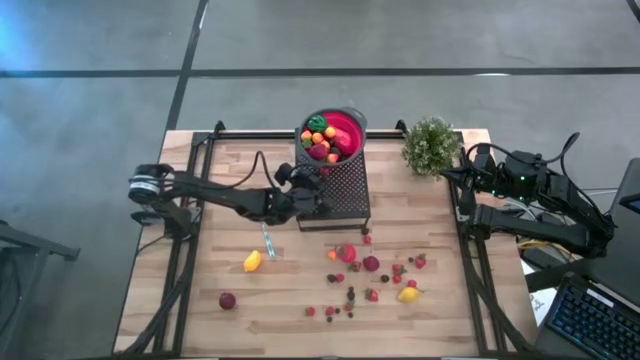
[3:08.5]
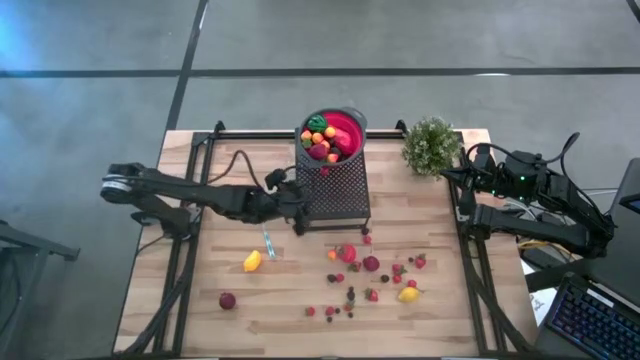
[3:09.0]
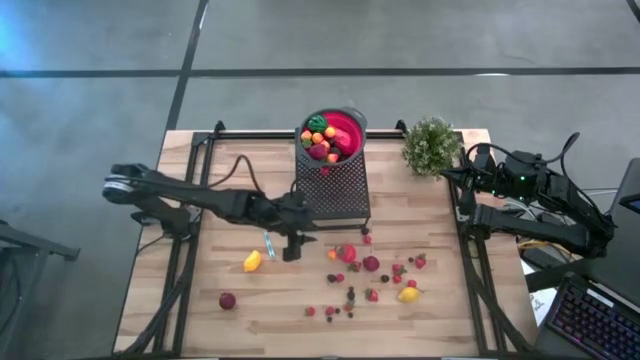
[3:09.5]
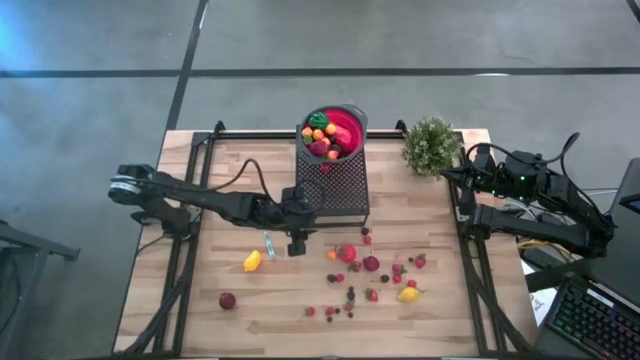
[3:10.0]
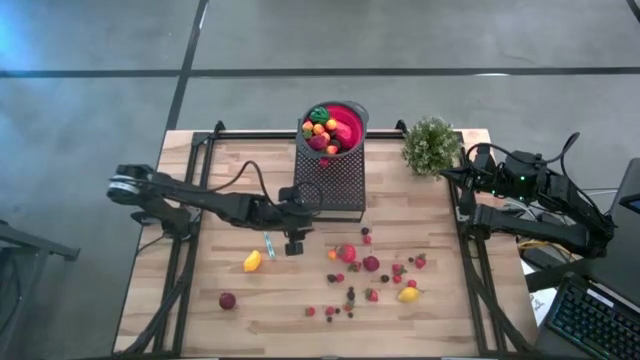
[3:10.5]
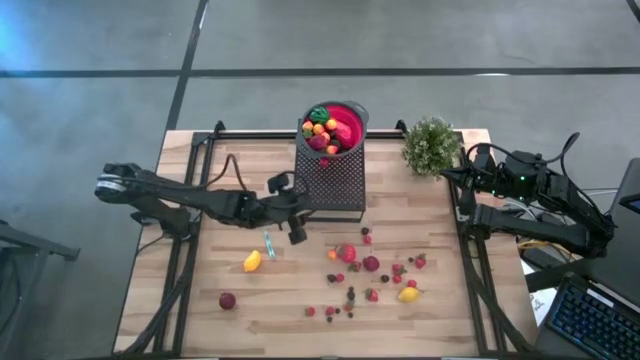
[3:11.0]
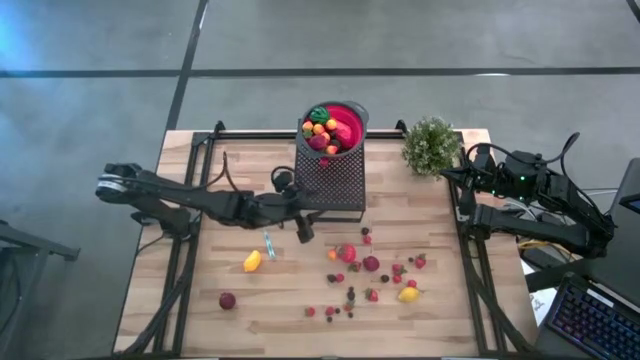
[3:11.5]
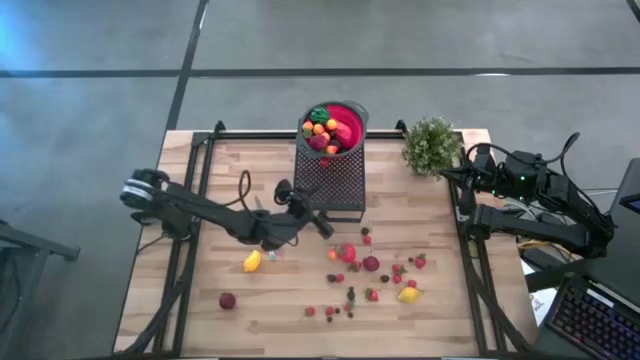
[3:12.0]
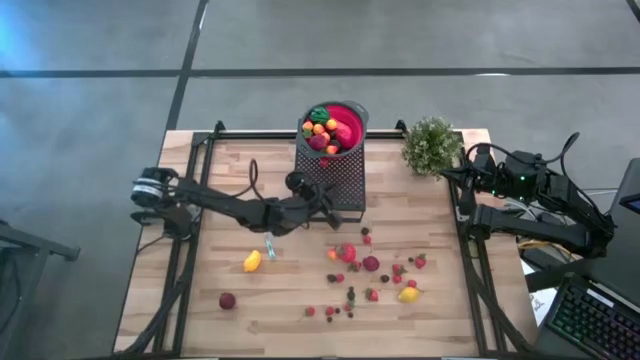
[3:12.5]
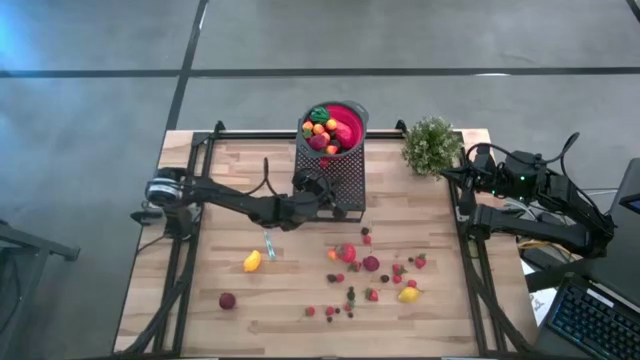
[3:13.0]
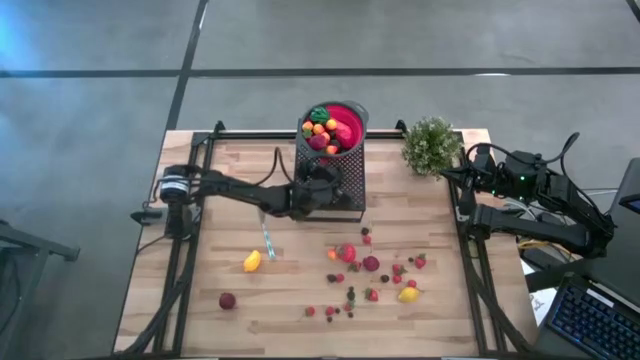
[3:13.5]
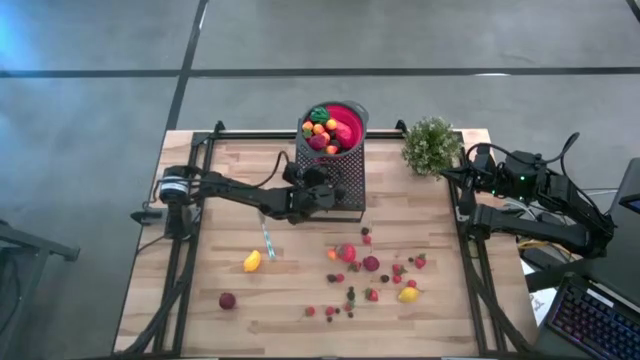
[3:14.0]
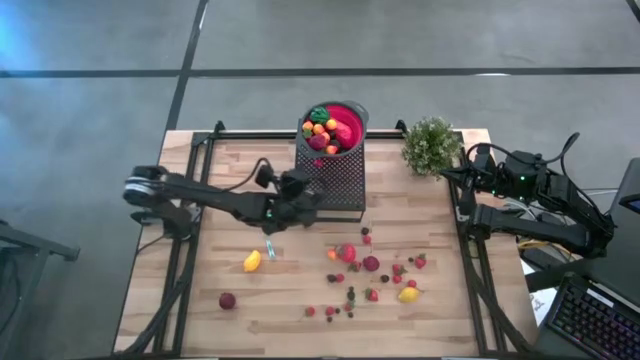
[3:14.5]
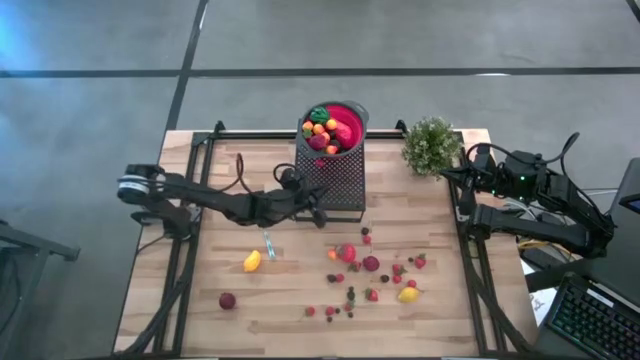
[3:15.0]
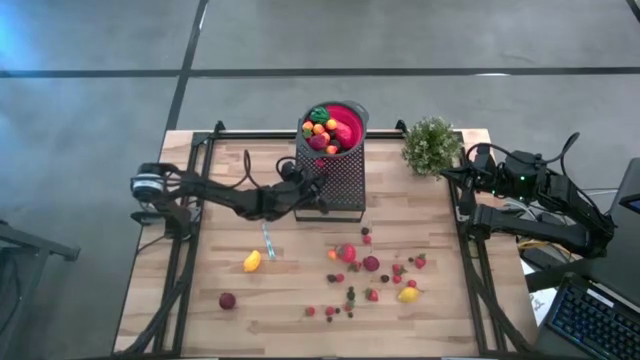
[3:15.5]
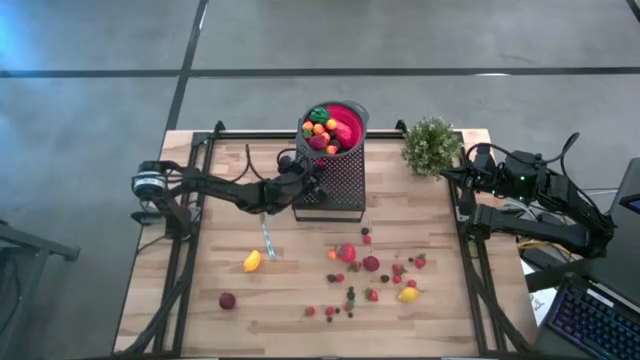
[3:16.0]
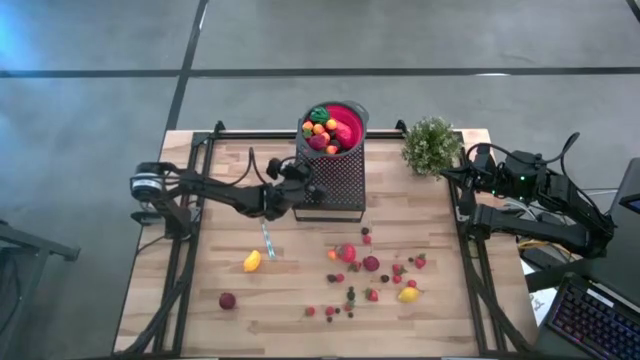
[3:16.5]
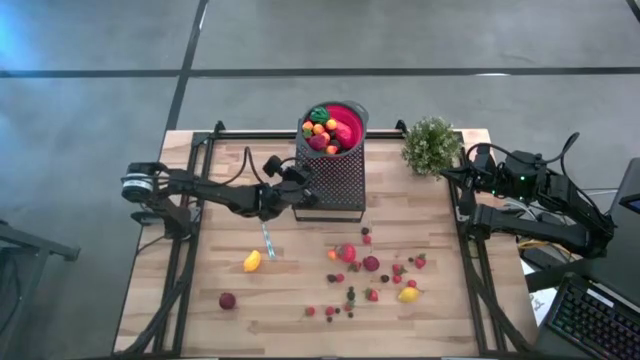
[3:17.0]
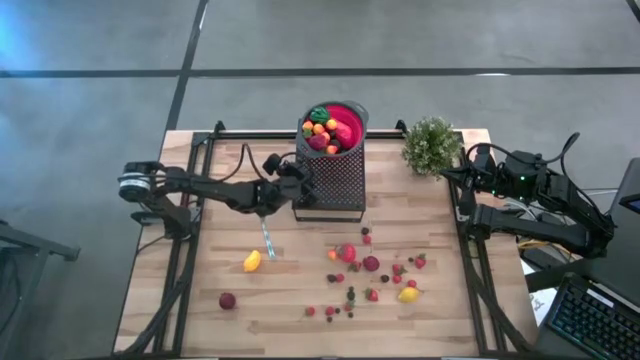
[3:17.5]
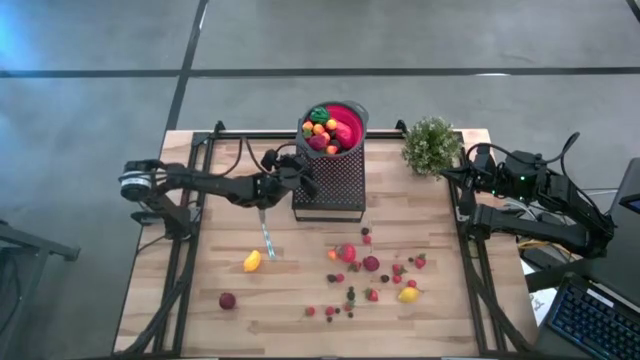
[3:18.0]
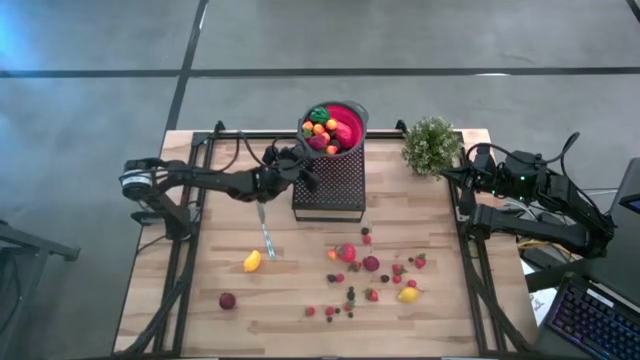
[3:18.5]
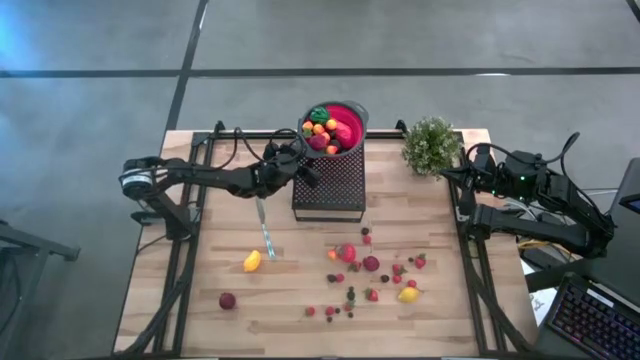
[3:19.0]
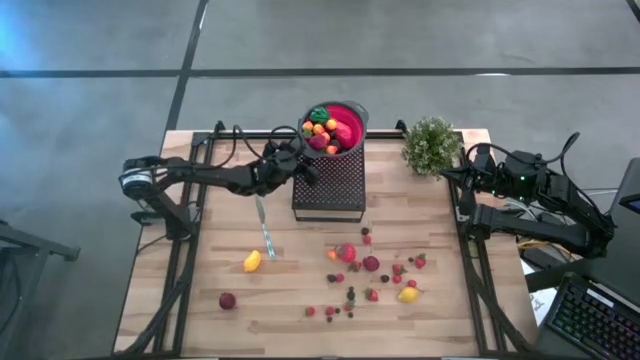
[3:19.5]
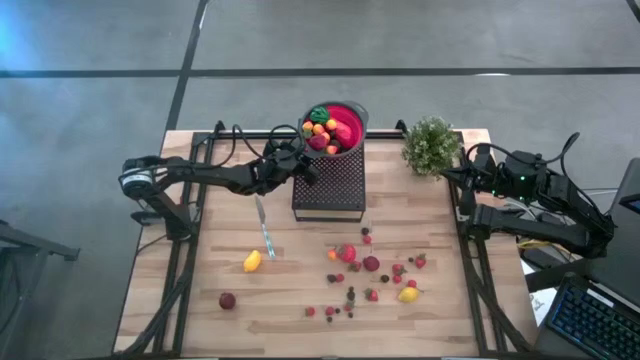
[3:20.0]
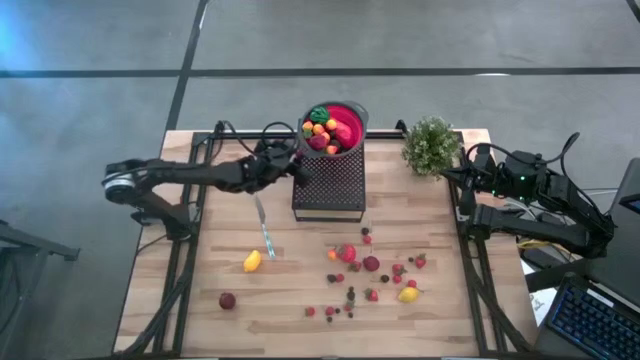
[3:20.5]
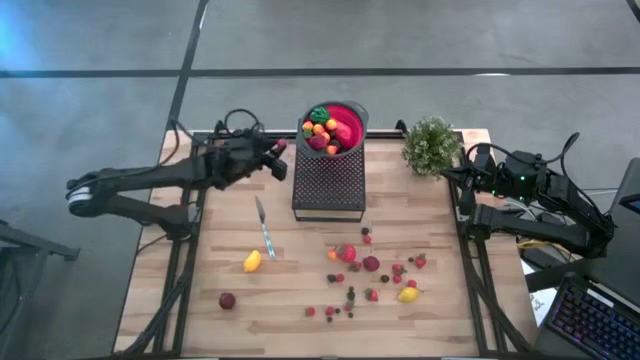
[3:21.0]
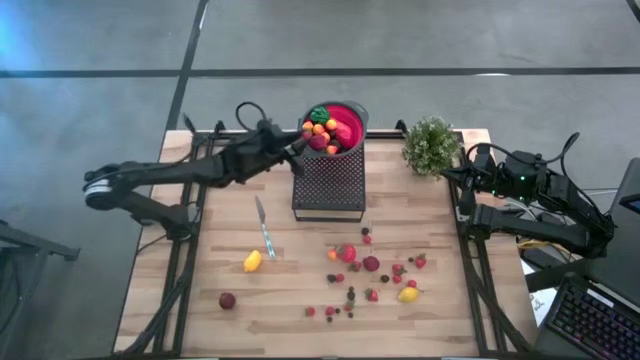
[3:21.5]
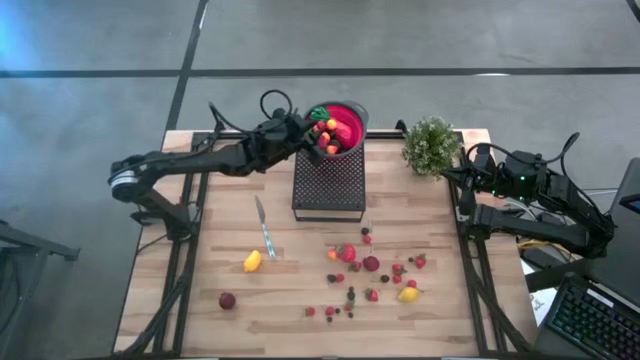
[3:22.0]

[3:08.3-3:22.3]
Task: Pick & Place Fruit
Put the red cherry into the strainer bowl on the shelf

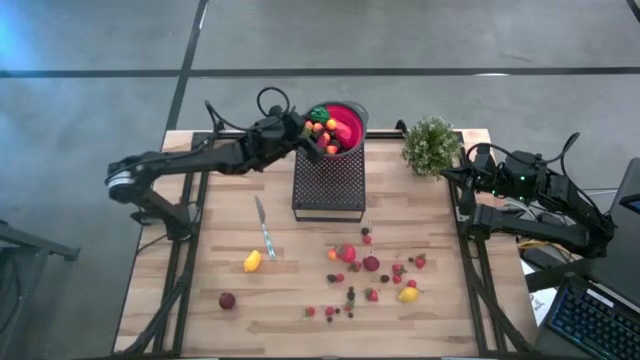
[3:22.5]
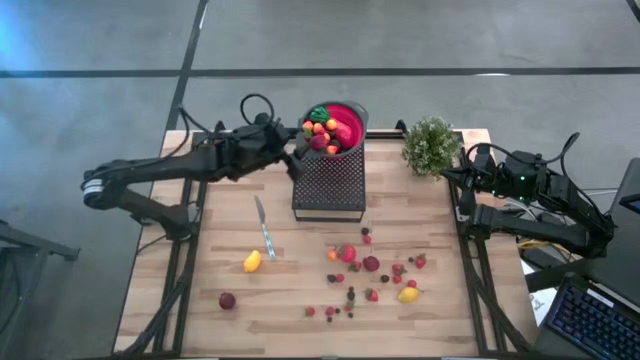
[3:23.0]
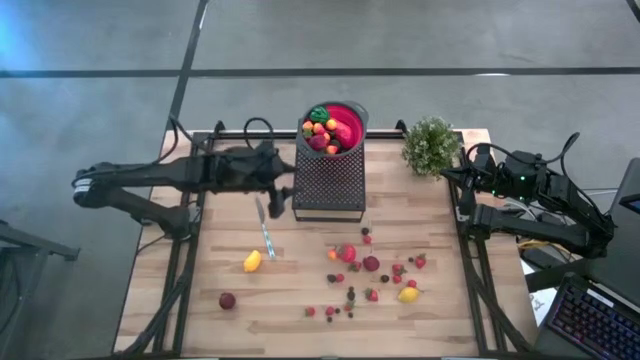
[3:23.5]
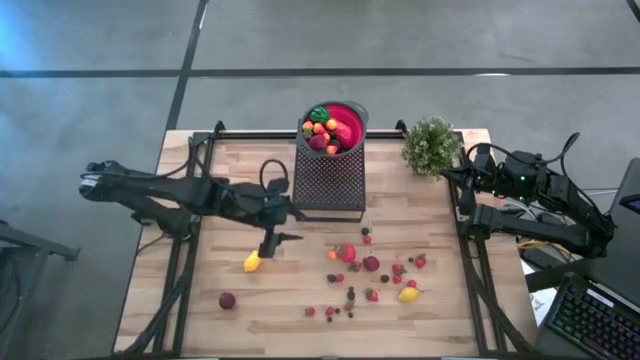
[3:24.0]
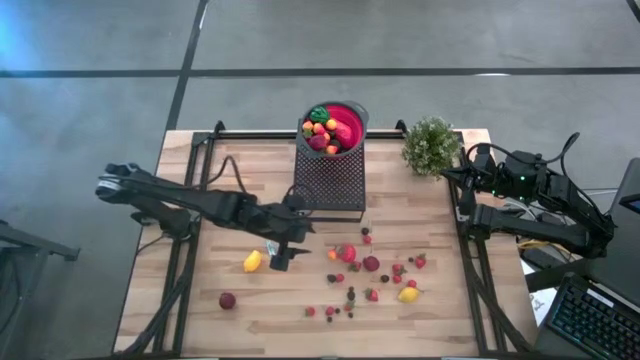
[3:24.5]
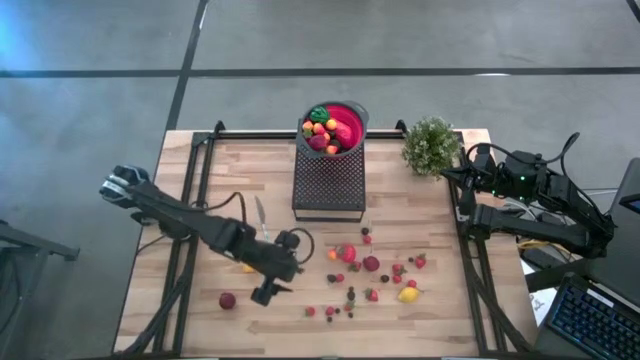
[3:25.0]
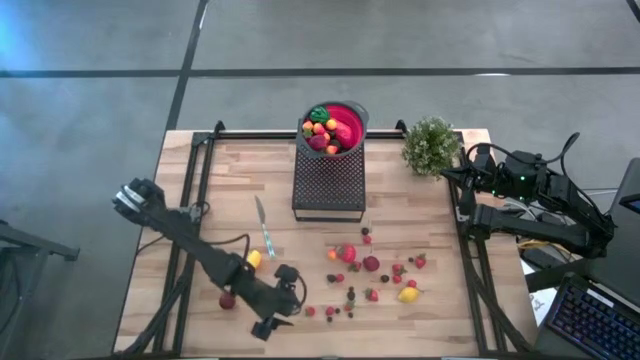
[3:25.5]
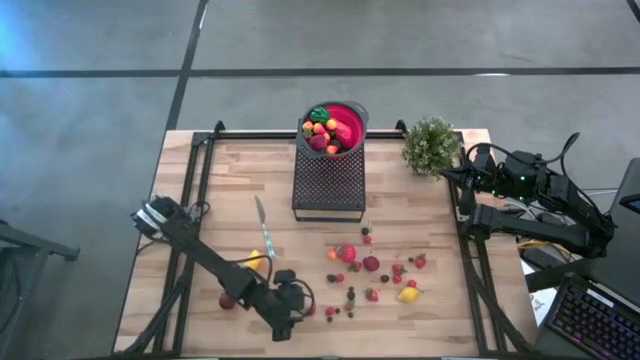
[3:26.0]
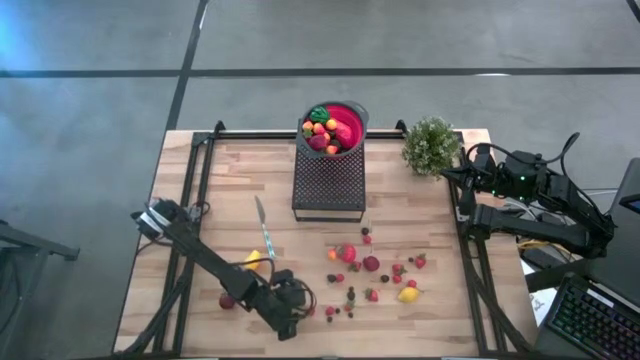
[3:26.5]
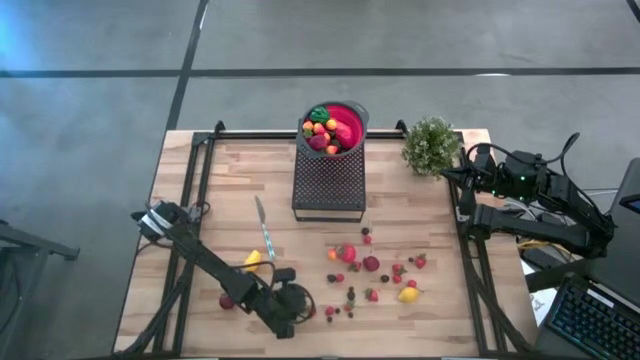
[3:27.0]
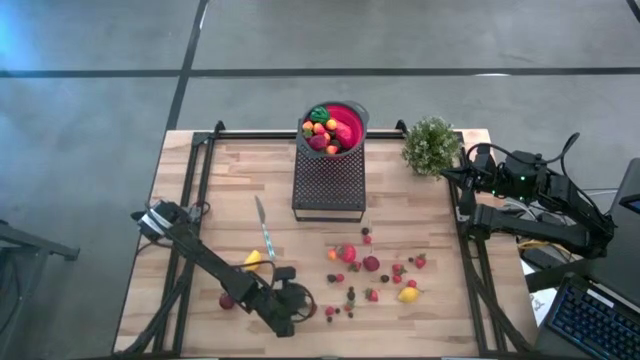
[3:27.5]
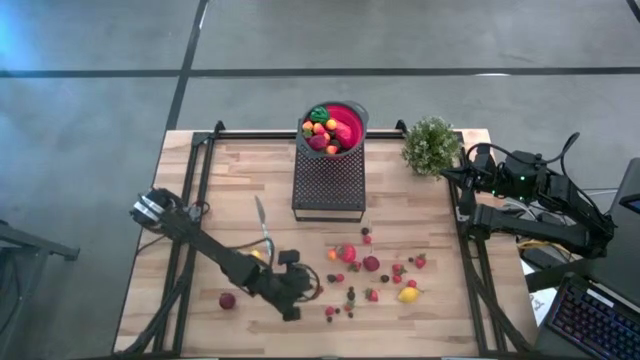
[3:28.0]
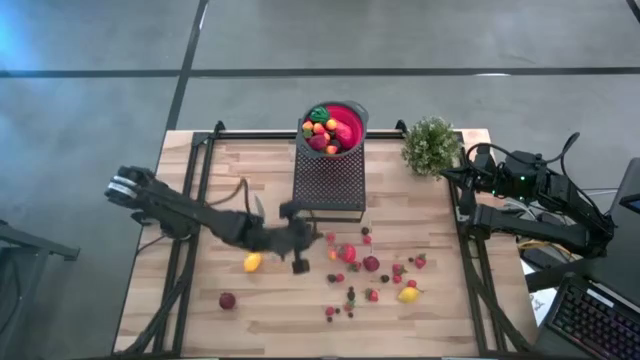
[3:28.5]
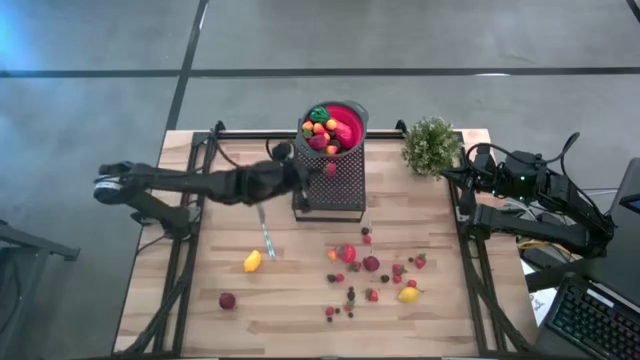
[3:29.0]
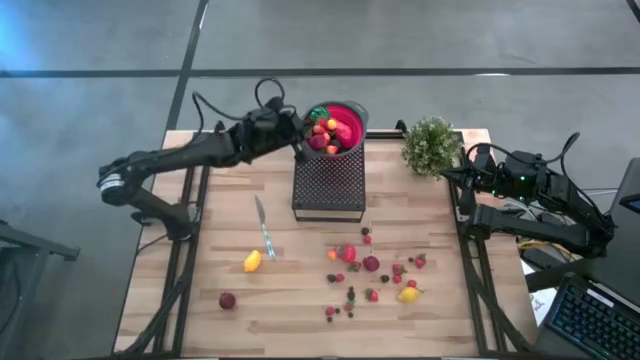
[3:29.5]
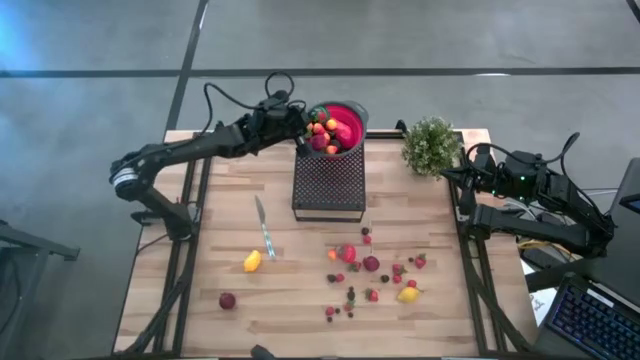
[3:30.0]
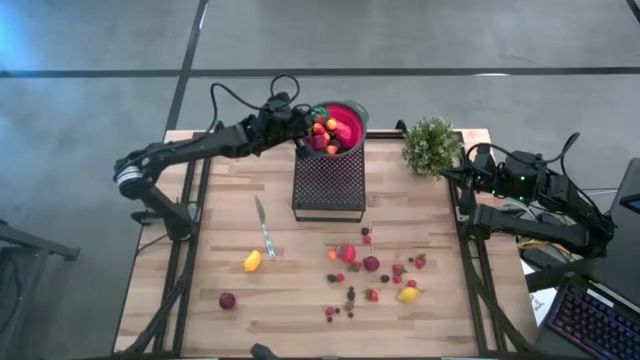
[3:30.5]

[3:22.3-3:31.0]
Put the strawberry into the strainer bowl on the shelf
